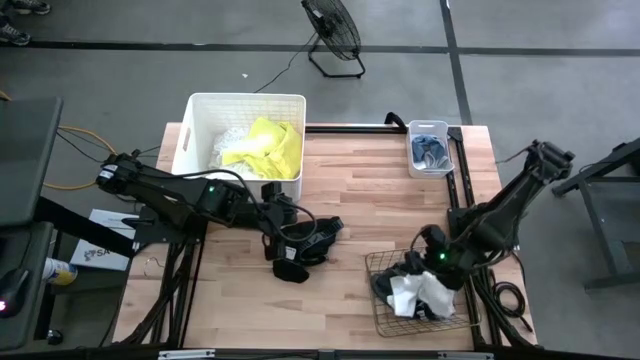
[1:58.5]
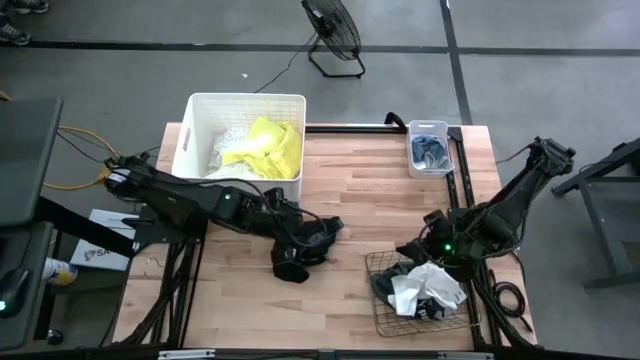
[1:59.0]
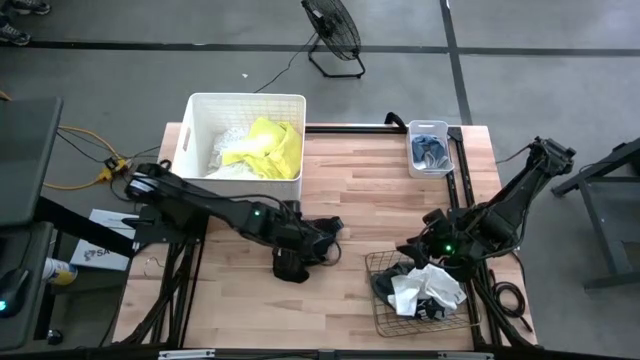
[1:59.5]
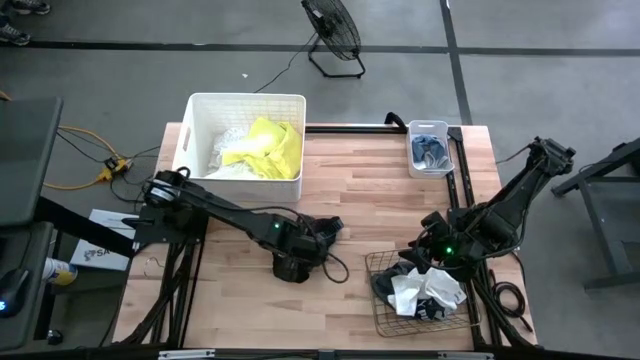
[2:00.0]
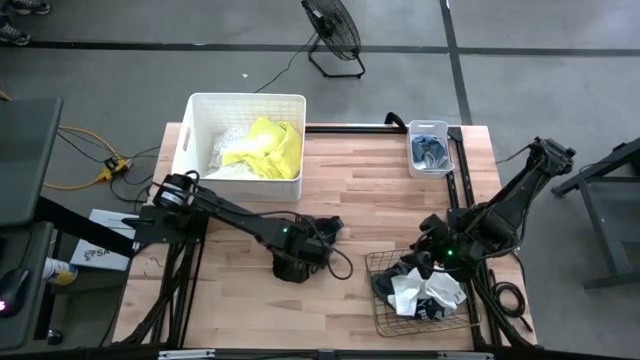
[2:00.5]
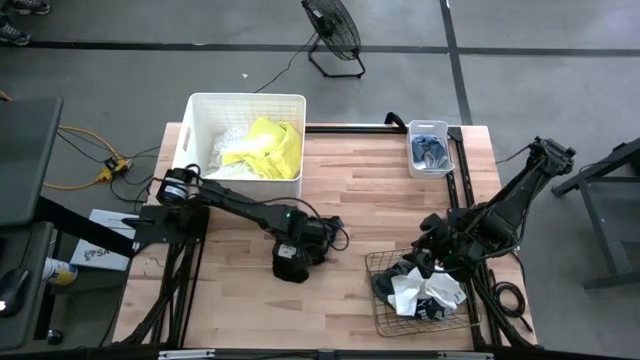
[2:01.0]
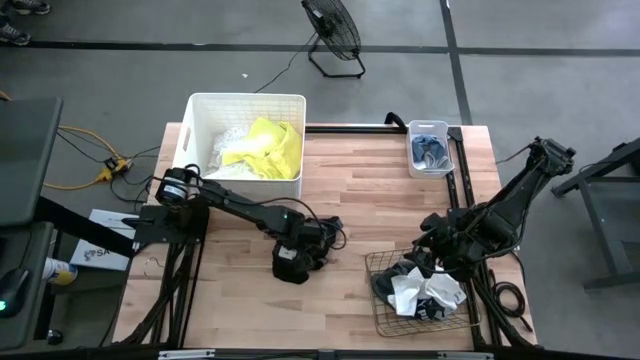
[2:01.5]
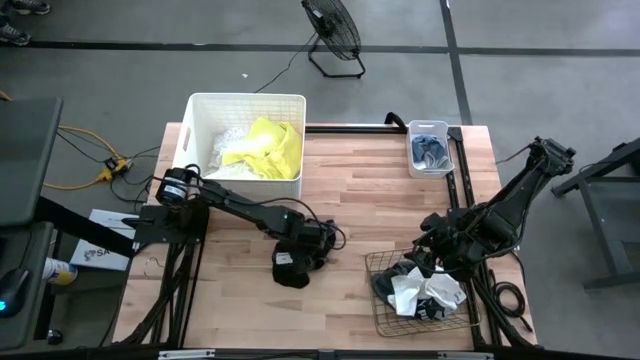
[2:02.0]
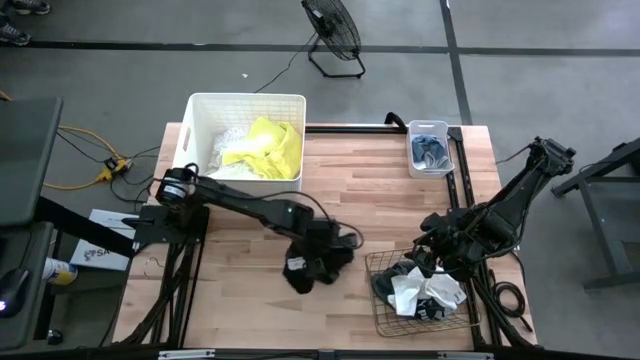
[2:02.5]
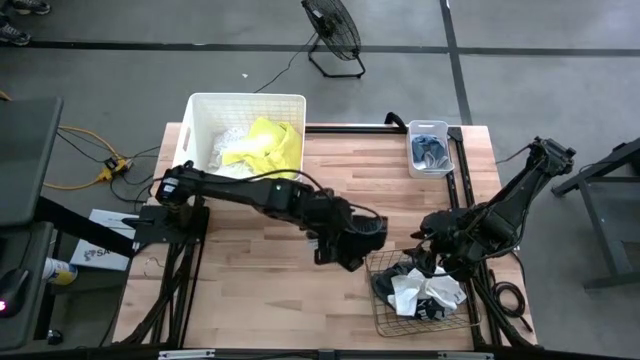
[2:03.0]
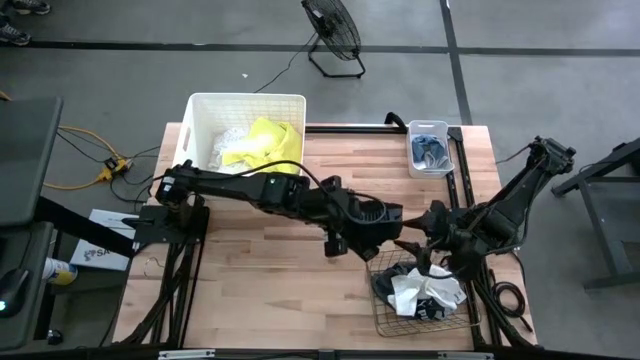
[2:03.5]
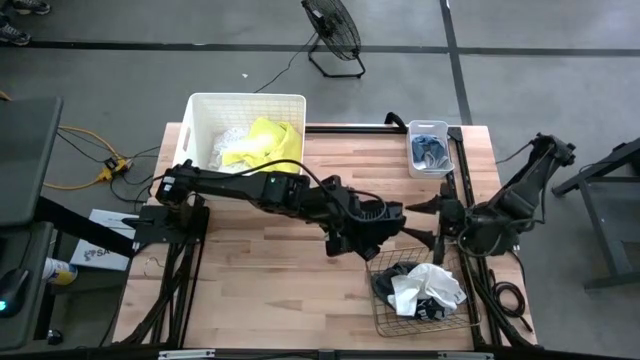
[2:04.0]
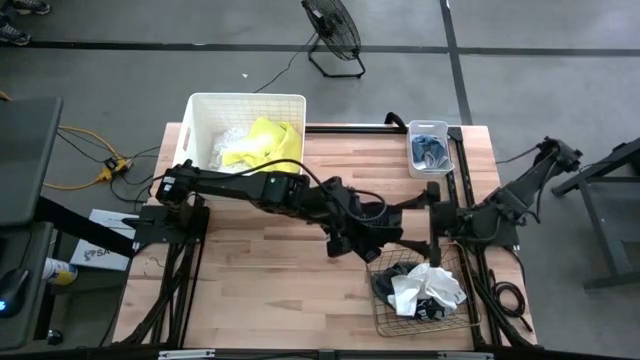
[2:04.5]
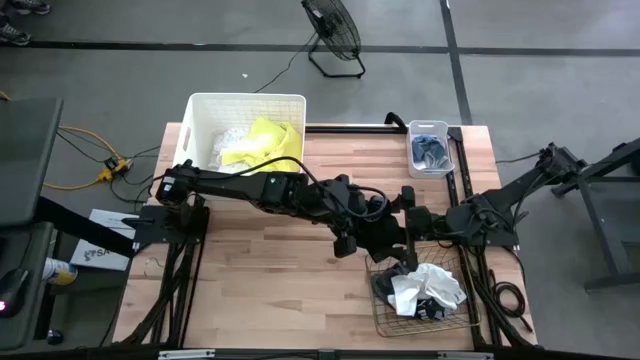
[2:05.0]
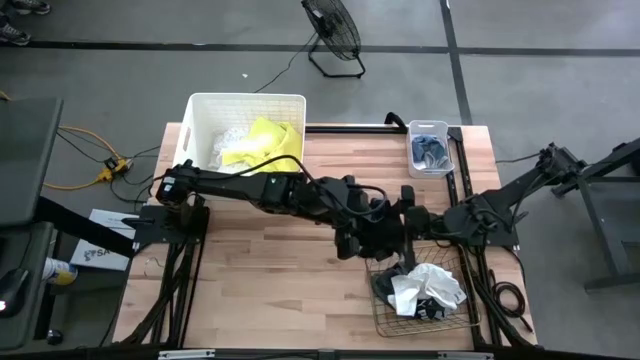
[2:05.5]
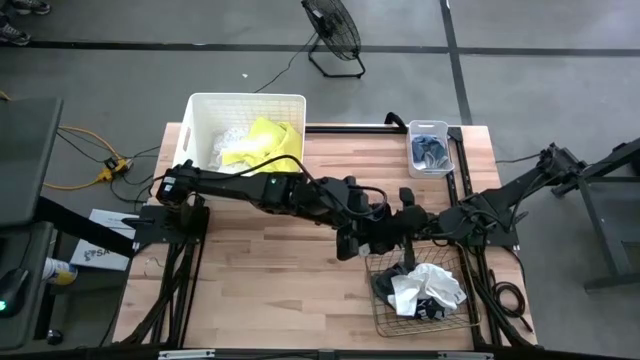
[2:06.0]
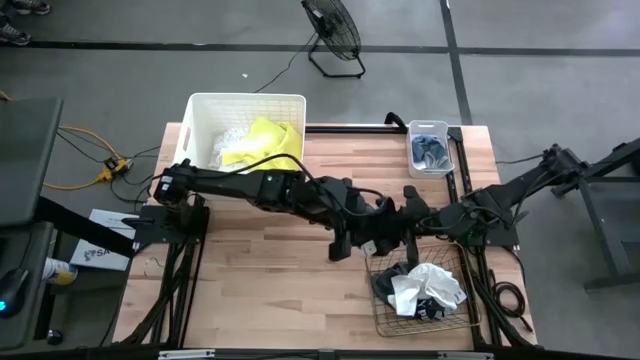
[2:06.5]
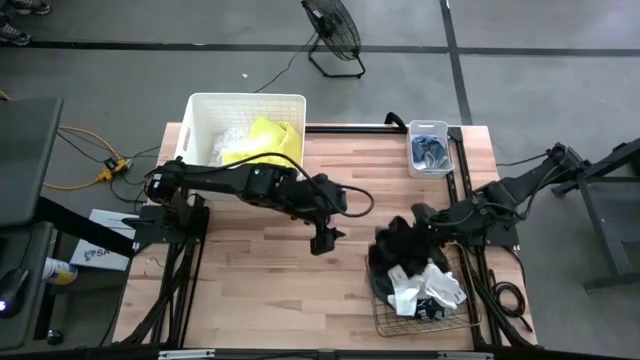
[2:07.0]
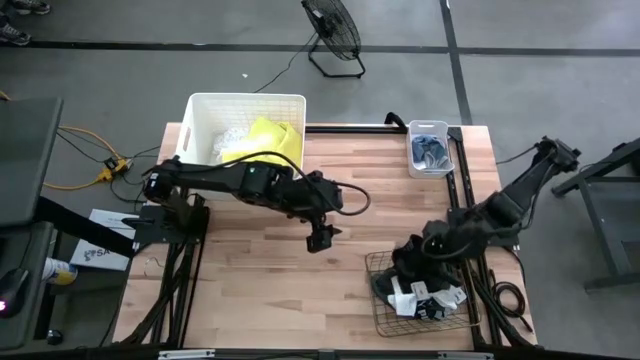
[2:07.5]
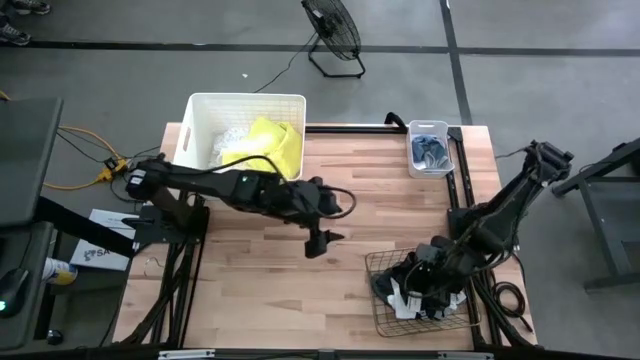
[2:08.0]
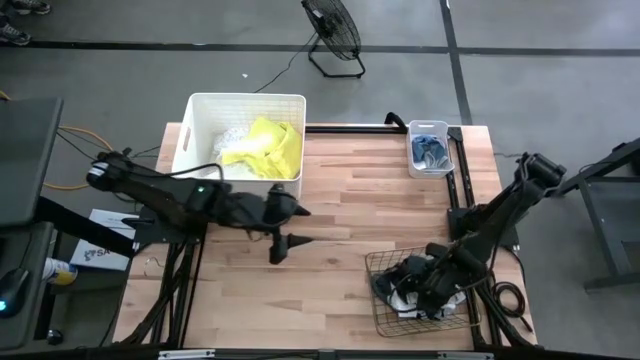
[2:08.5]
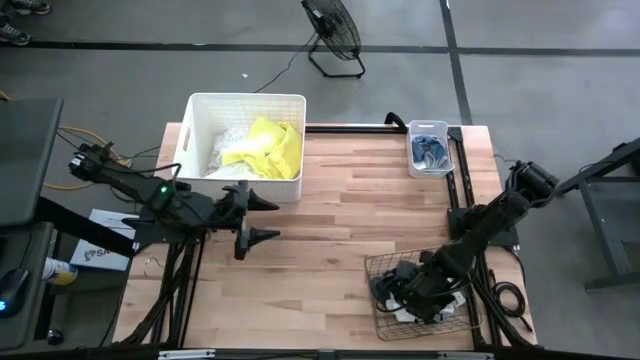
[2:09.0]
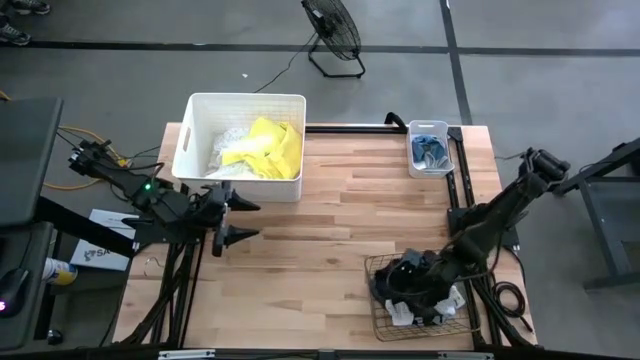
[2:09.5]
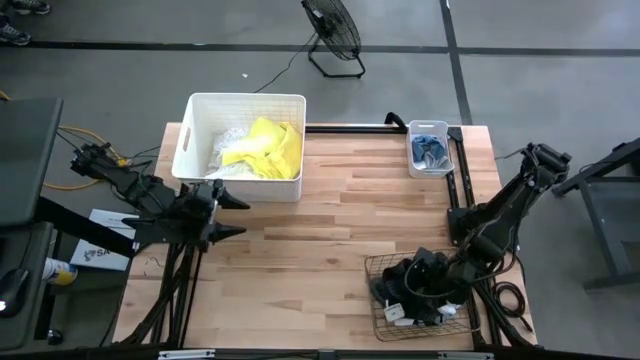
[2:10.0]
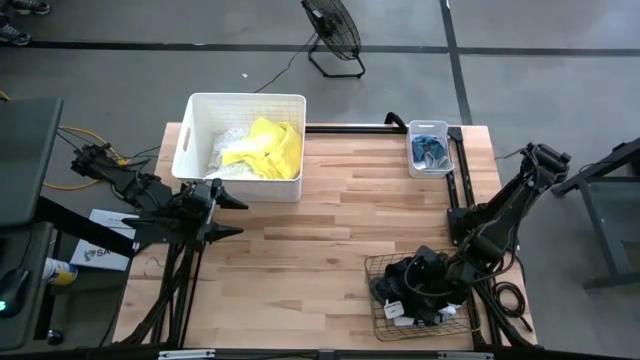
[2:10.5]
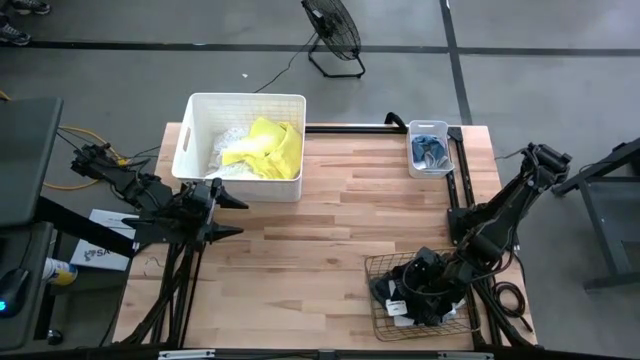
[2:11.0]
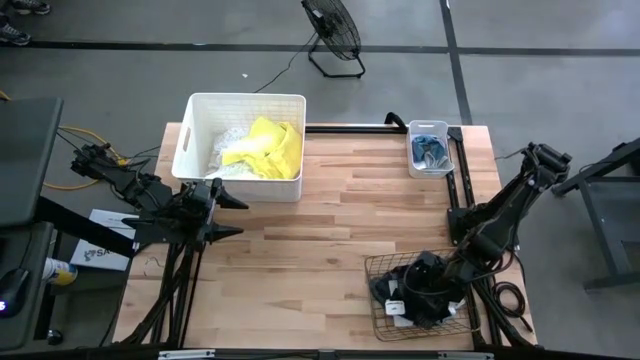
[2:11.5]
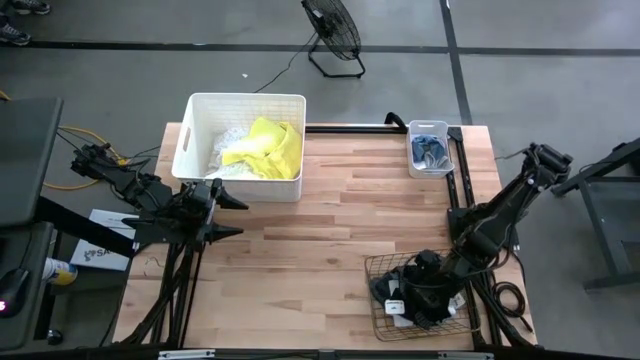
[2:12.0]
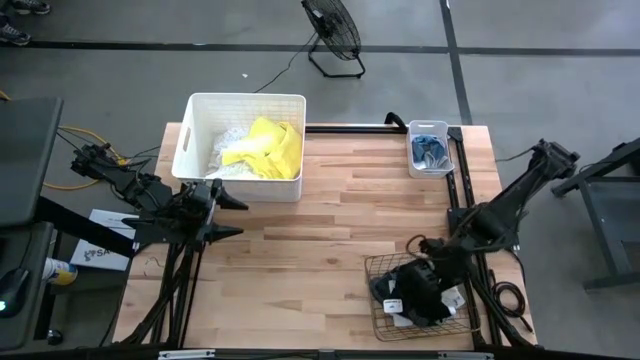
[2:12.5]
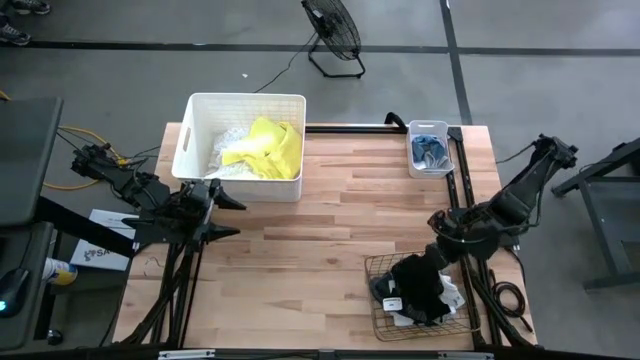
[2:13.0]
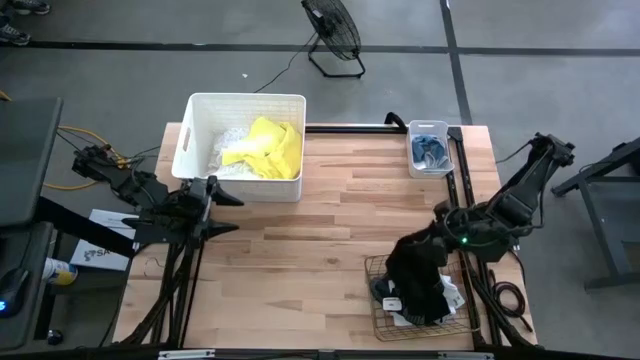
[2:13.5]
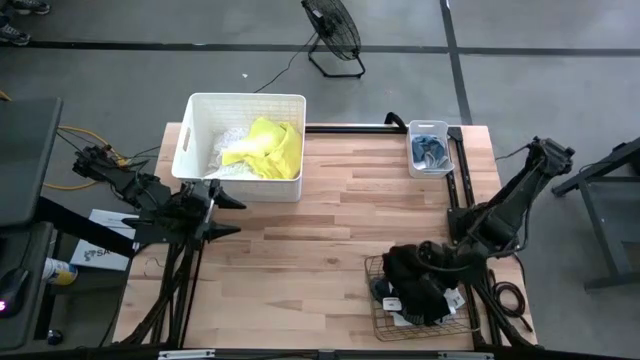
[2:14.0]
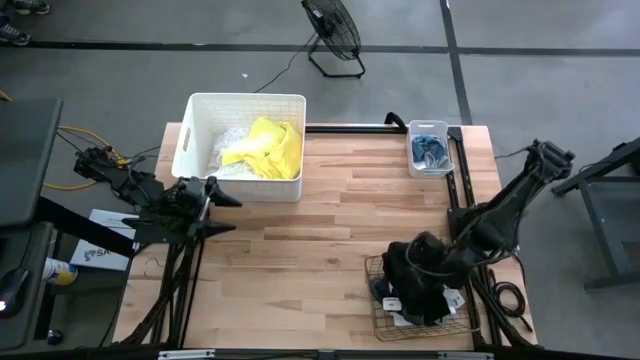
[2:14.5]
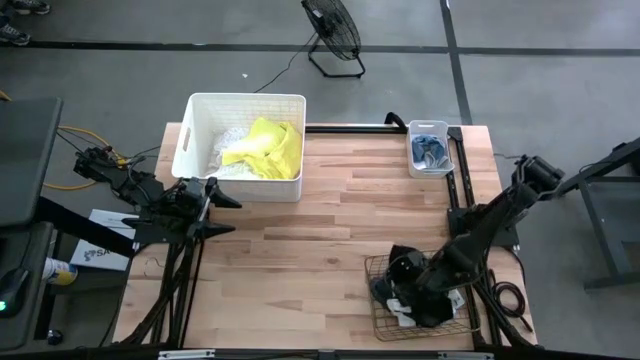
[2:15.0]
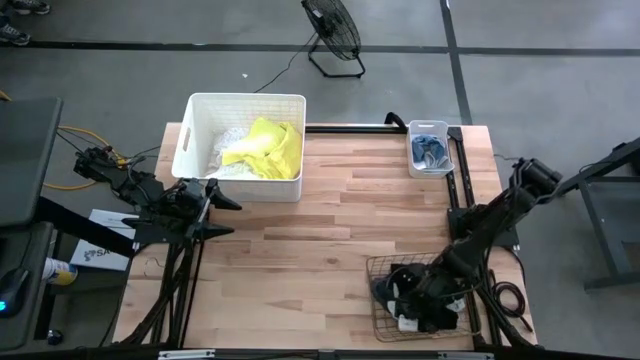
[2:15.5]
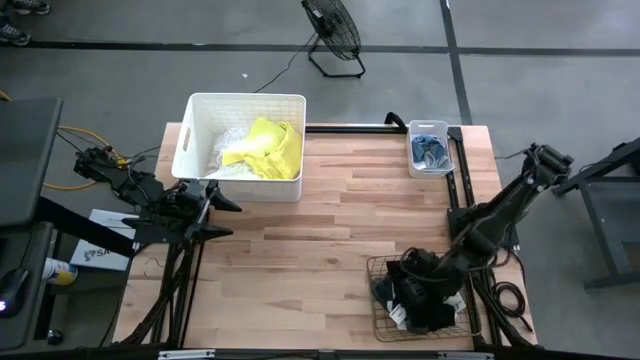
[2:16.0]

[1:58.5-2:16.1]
Task: Pick & Place Cloths
Put the black underwear into the wire basket

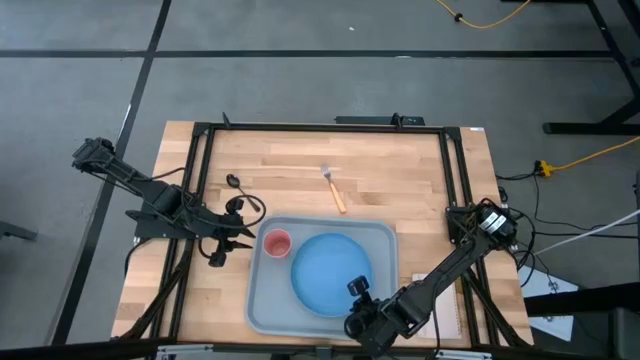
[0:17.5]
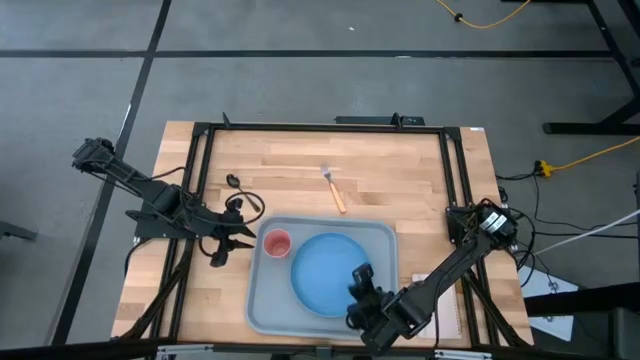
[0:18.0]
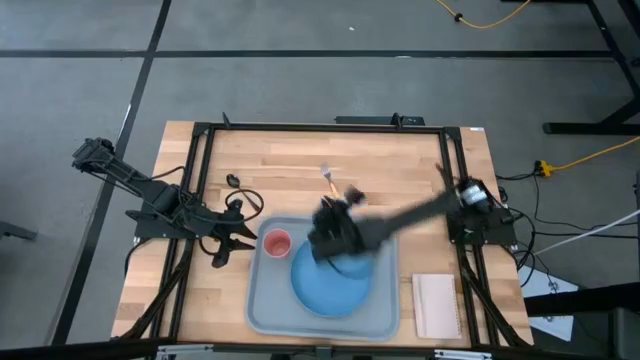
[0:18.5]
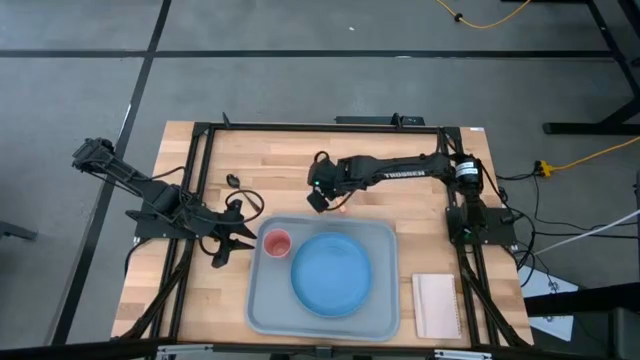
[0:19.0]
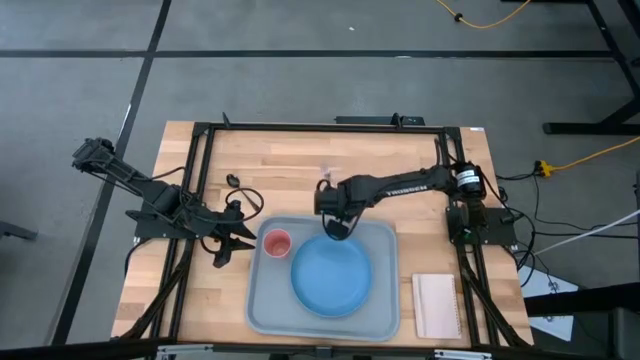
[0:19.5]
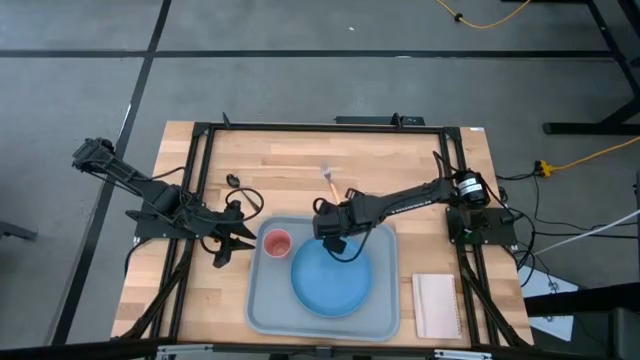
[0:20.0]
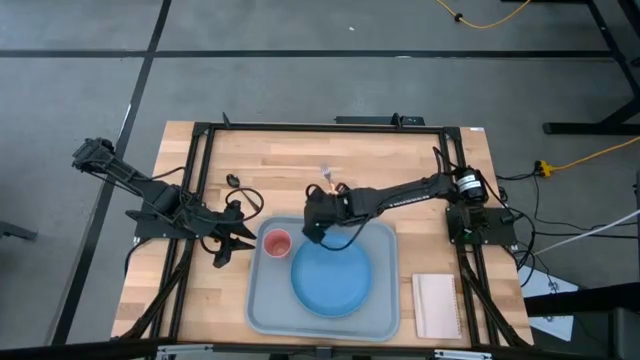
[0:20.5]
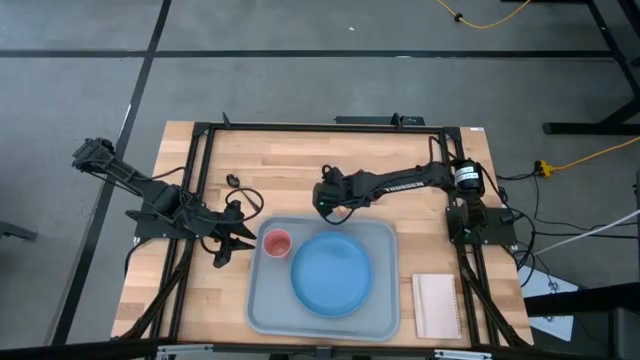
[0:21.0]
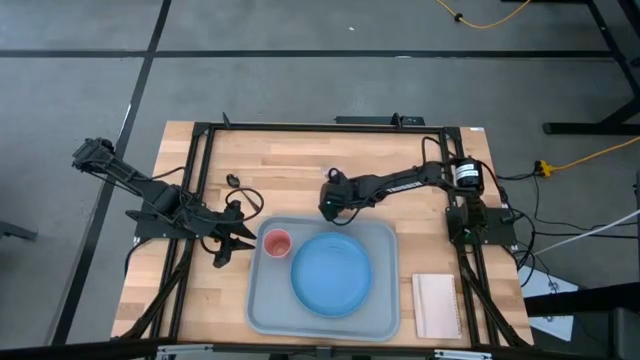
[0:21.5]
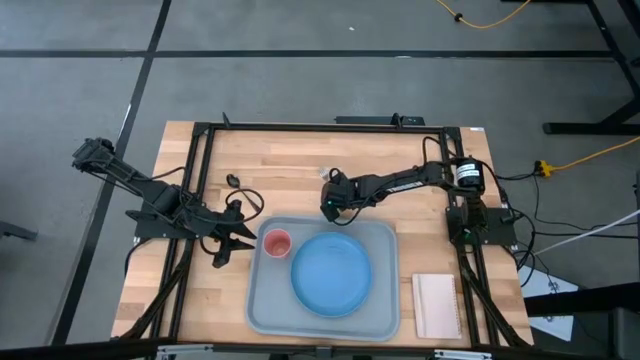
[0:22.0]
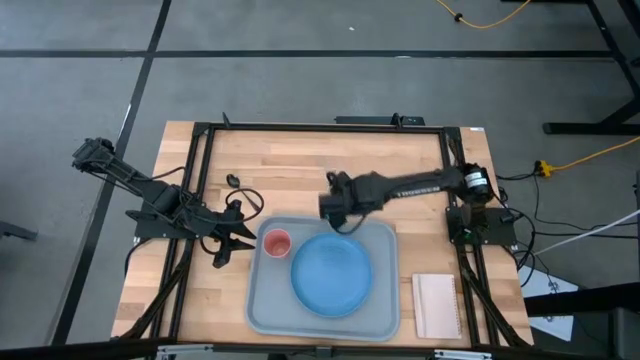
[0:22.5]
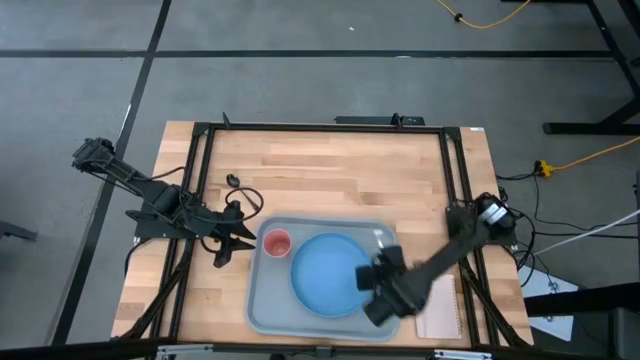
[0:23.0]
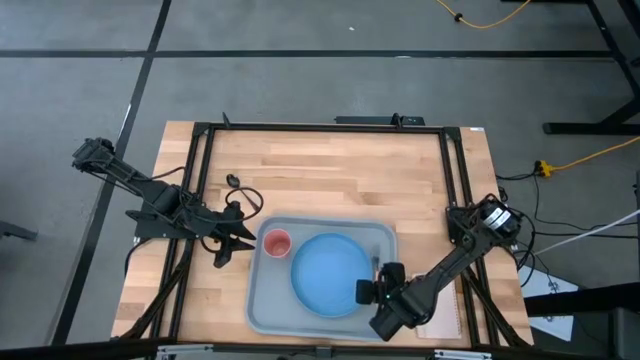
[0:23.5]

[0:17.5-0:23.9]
Task: Pick and place plate/cup/fork/spoon on tray
Put the orange fork on the gray tray on the right of the blue plate
